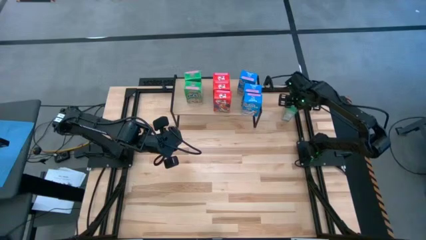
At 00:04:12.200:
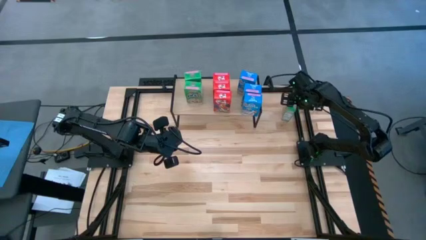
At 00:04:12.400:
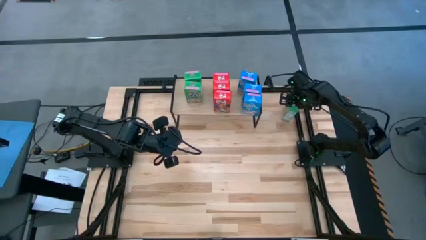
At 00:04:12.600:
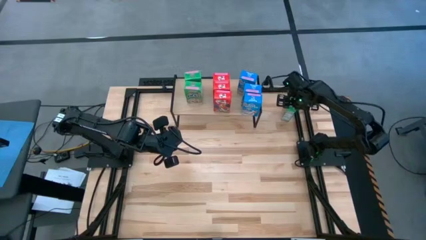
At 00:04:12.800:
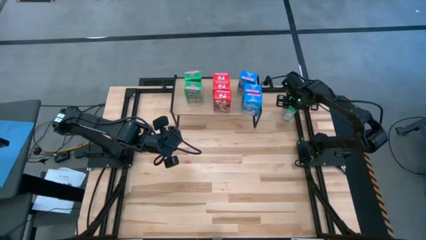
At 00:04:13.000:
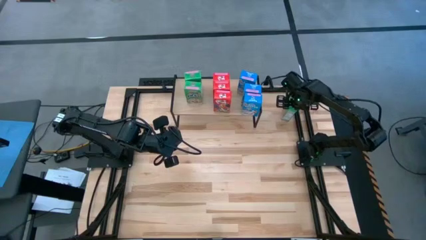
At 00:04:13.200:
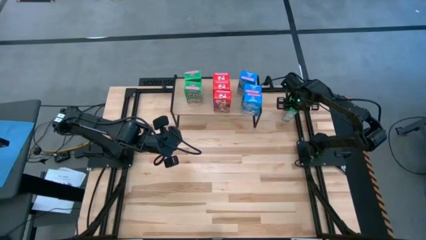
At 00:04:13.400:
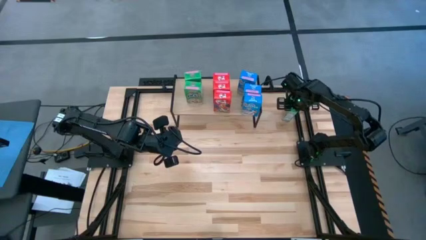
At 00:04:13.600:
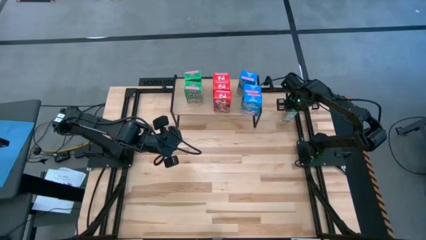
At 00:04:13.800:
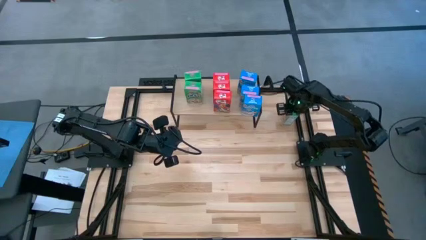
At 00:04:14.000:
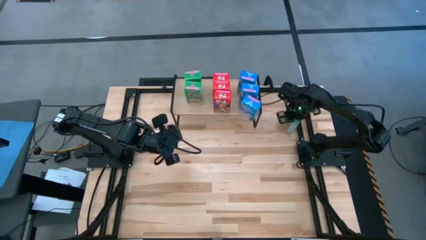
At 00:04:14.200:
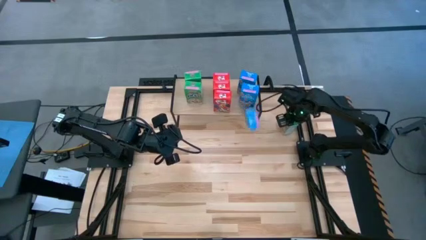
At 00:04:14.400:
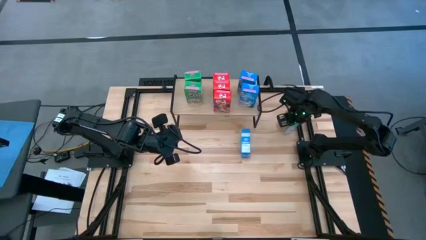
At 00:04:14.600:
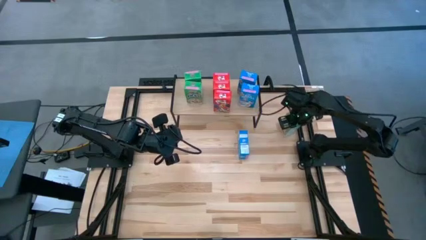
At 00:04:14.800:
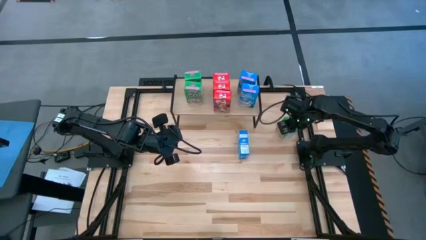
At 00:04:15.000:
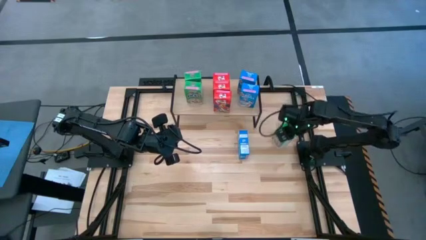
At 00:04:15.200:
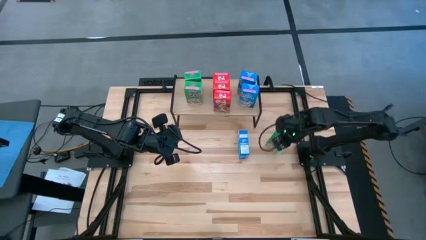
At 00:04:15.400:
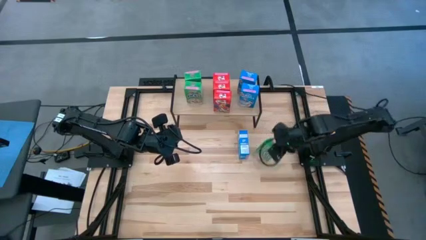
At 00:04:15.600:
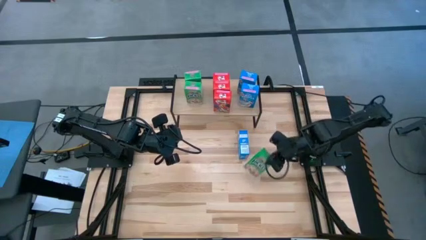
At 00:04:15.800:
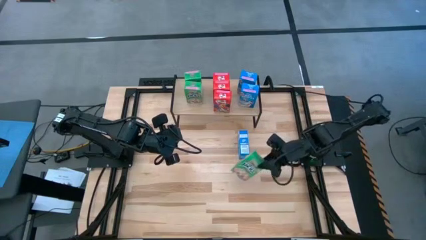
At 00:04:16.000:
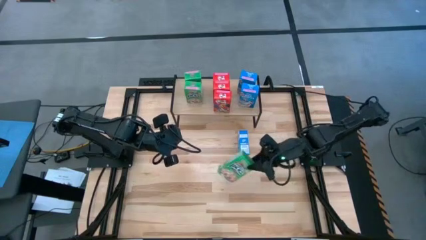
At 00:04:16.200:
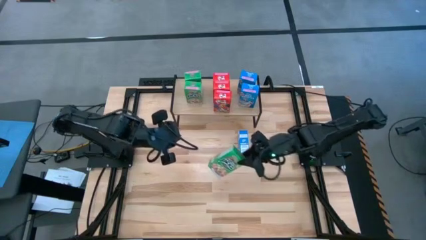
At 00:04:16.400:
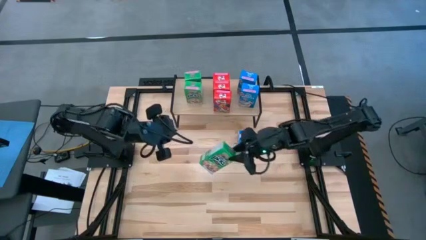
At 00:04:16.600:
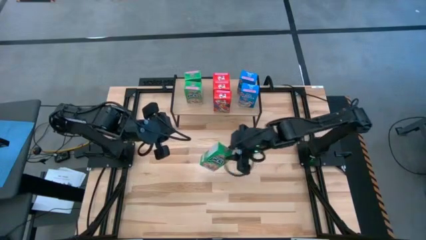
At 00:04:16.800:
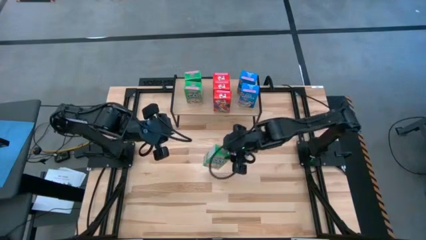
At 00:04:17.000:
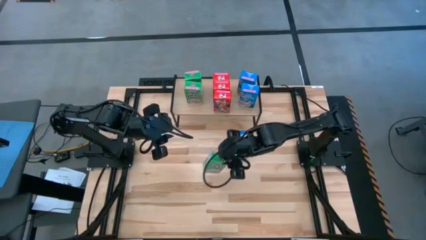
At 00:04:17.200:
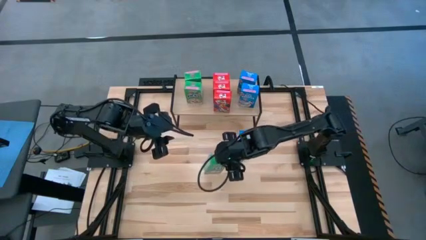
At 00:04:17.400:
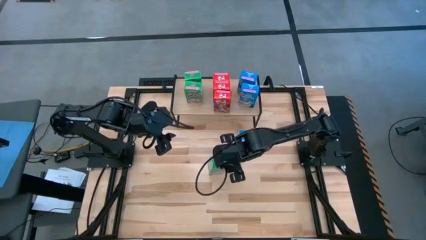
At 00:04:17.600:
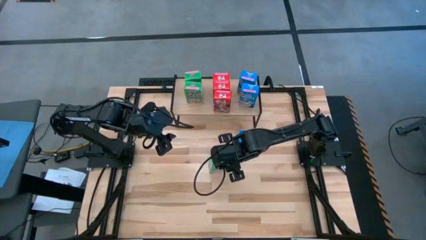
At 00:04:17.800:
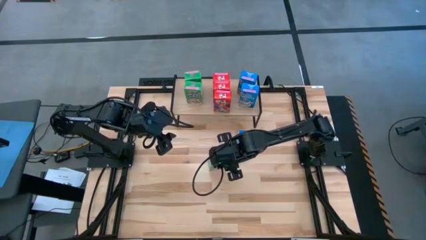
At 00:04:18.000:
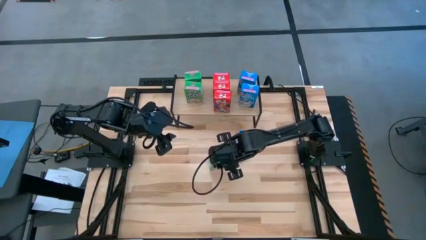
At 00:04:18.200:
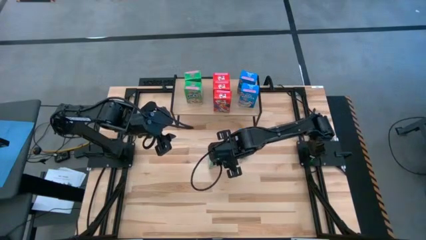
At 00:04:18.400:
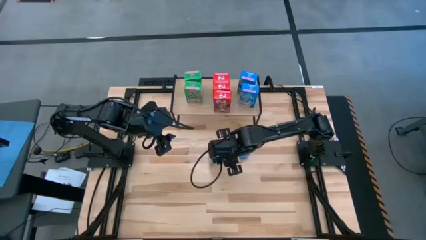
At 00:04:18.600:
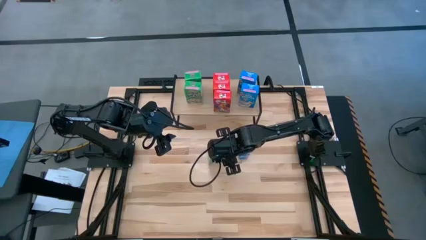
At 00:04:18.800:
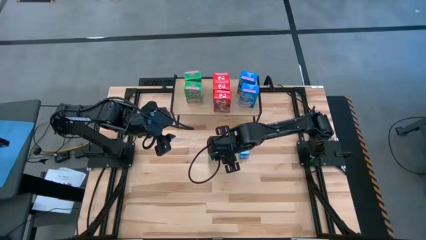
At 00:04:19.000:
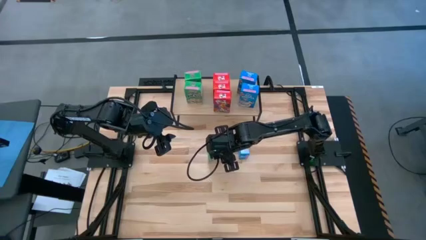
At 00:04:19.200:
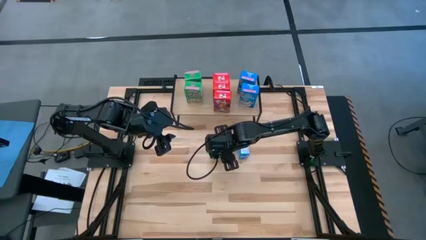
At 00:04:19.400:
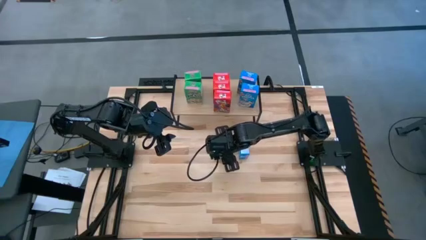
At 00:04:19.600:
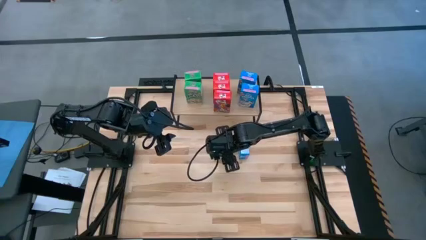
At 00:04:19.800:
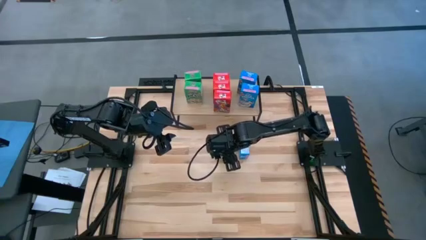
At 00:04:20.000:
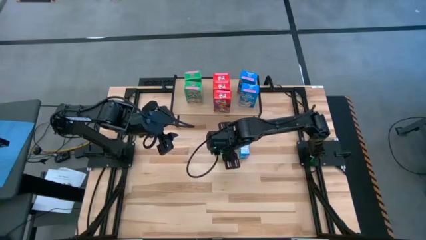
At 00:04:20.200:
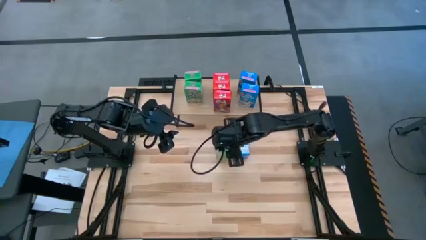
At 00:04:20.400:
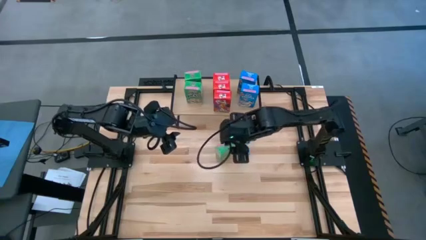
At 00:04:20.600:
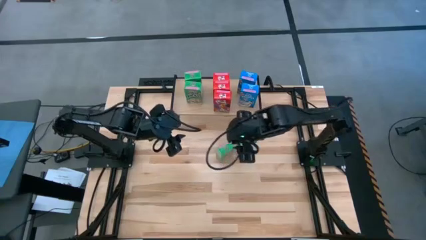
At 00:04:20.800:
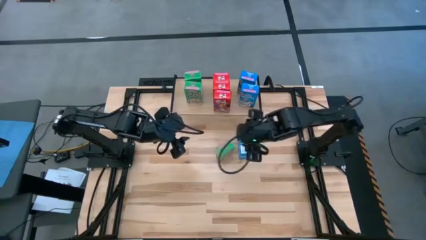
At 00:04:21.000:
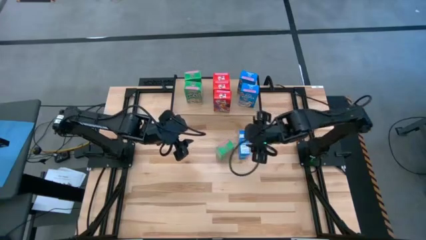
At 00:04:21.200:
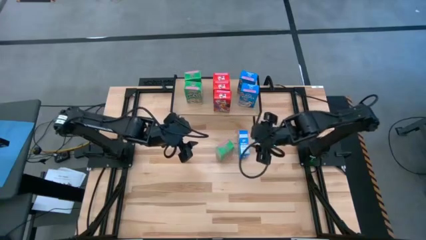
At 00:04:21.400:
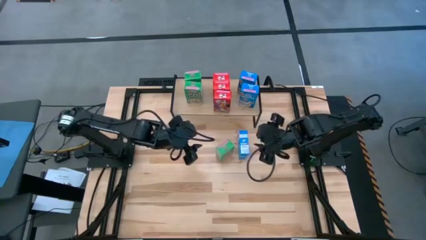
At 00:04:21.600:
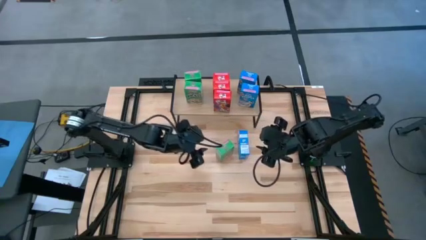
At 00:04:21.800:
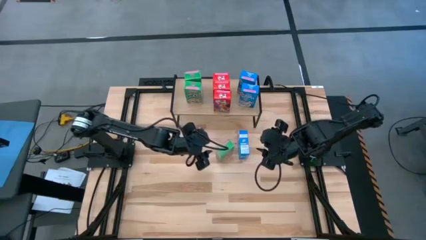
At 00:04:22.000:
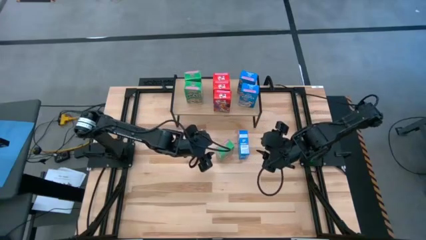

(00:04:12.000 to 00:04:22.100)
Task: Stack cereal on shelf
Put the green cereal box on the shelf aligned with the other green cereal boxes

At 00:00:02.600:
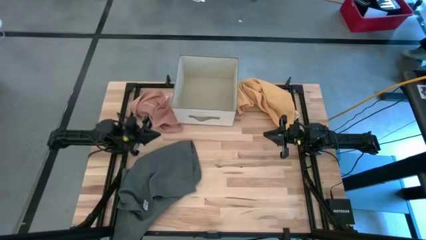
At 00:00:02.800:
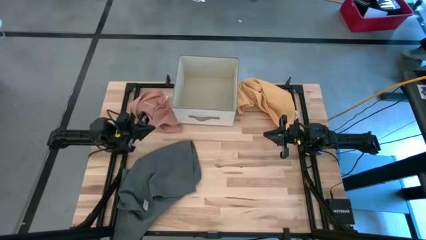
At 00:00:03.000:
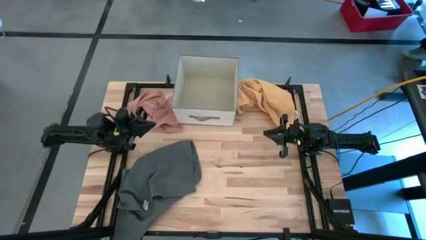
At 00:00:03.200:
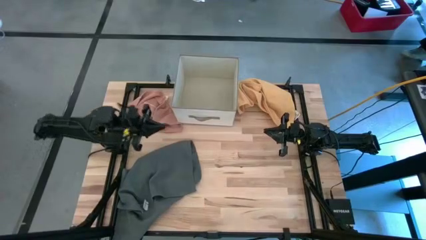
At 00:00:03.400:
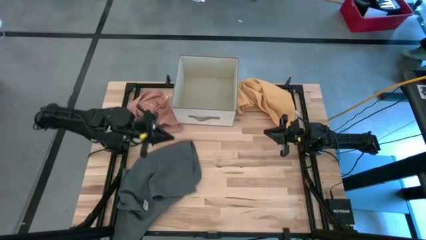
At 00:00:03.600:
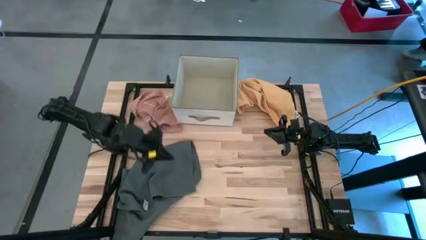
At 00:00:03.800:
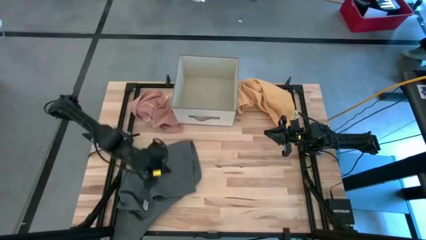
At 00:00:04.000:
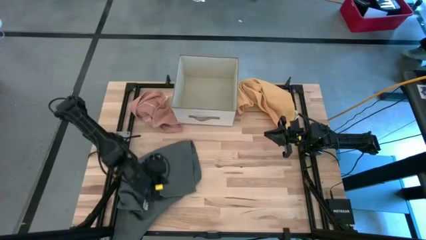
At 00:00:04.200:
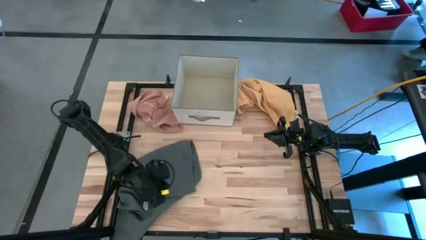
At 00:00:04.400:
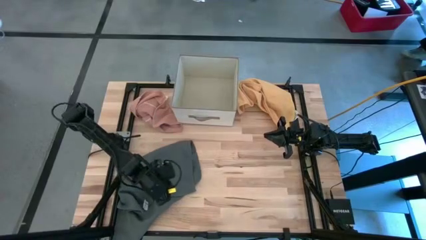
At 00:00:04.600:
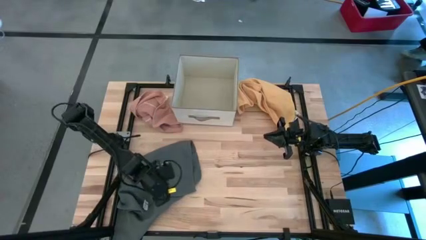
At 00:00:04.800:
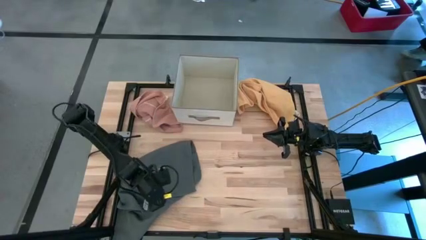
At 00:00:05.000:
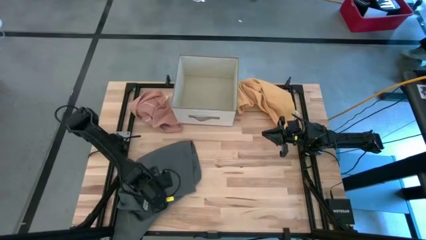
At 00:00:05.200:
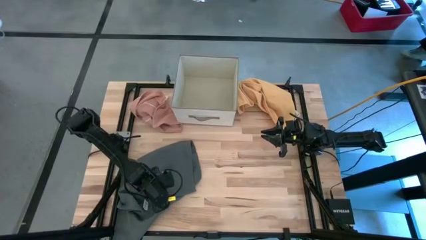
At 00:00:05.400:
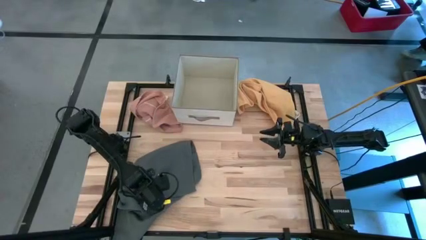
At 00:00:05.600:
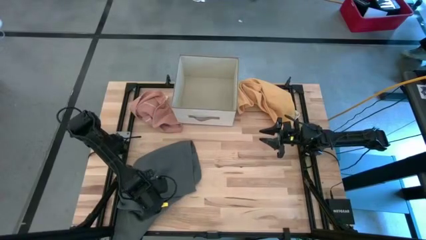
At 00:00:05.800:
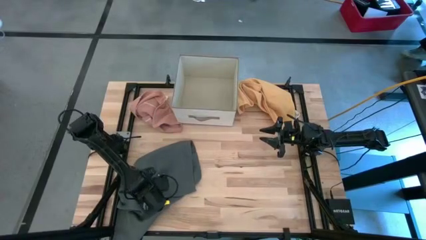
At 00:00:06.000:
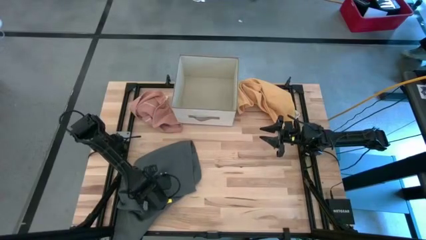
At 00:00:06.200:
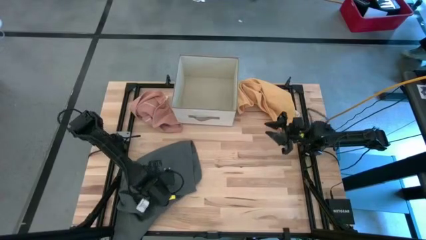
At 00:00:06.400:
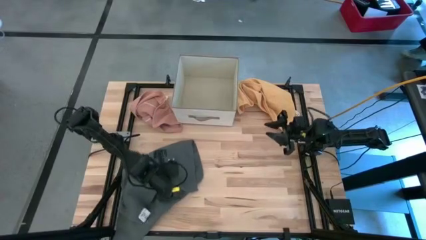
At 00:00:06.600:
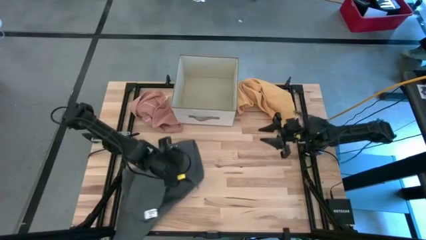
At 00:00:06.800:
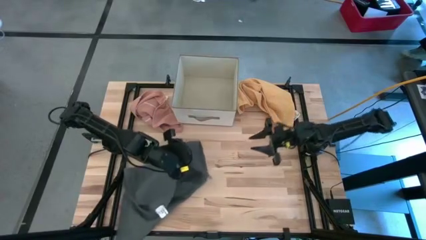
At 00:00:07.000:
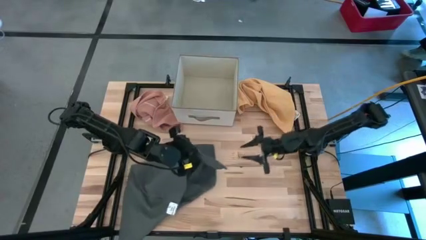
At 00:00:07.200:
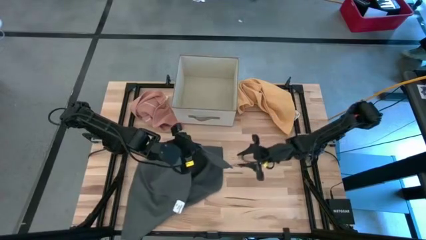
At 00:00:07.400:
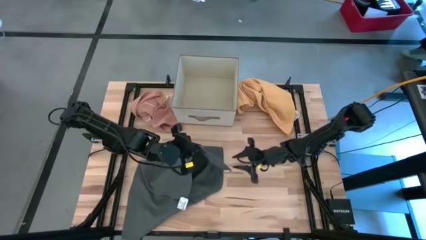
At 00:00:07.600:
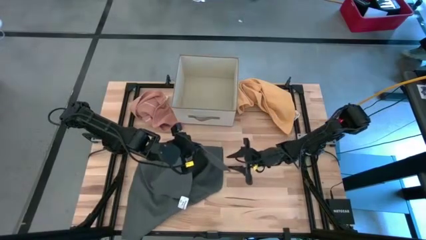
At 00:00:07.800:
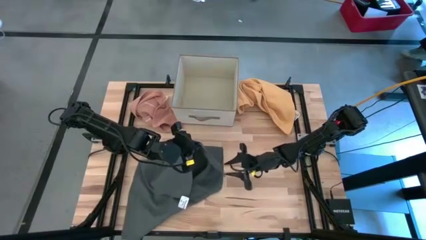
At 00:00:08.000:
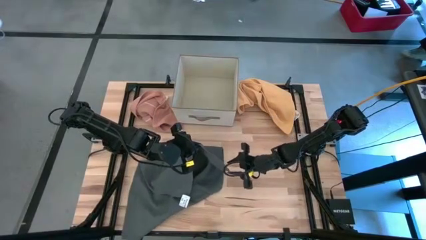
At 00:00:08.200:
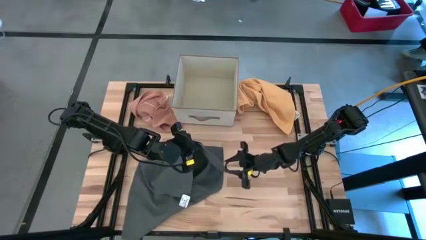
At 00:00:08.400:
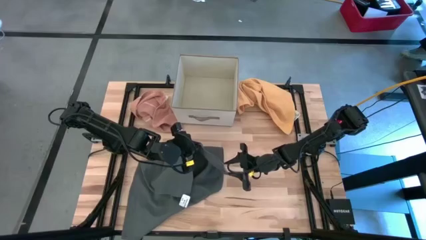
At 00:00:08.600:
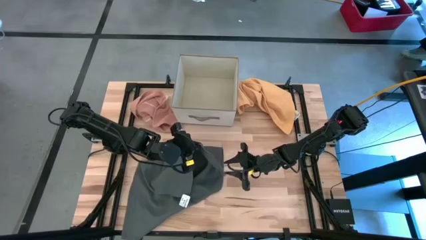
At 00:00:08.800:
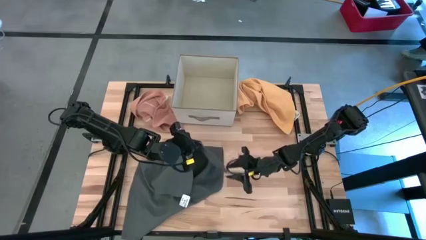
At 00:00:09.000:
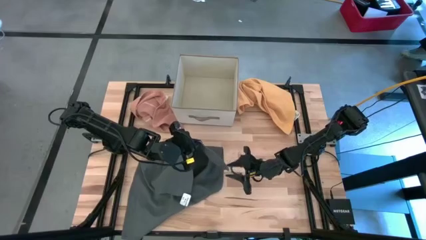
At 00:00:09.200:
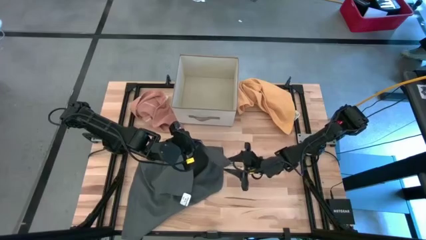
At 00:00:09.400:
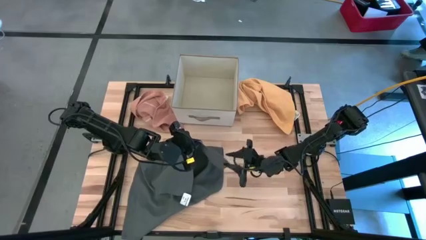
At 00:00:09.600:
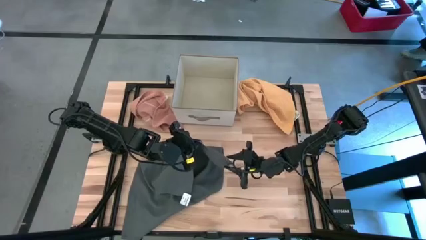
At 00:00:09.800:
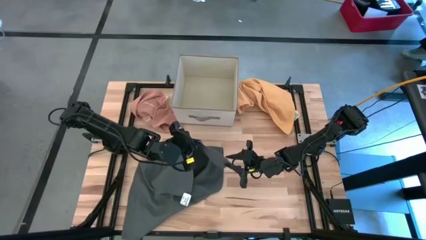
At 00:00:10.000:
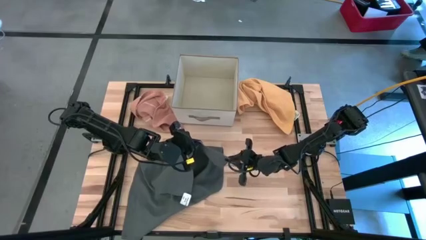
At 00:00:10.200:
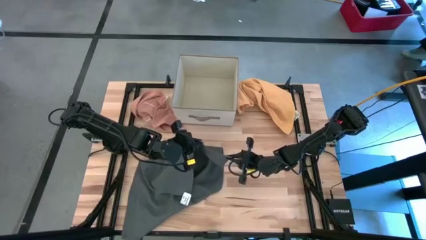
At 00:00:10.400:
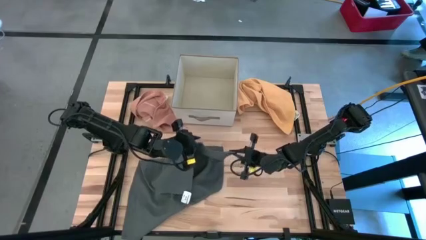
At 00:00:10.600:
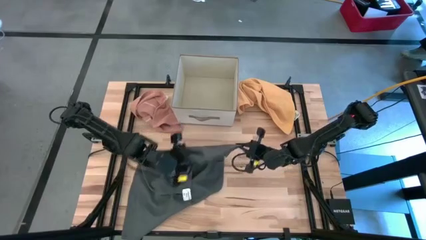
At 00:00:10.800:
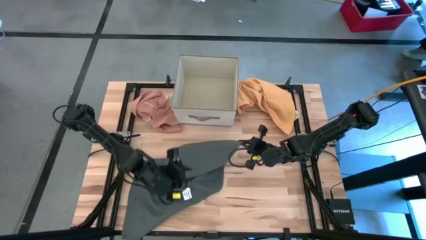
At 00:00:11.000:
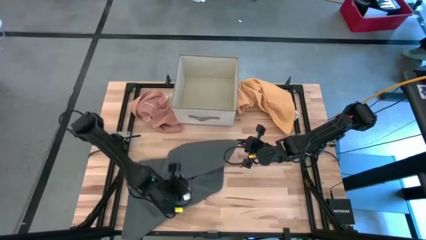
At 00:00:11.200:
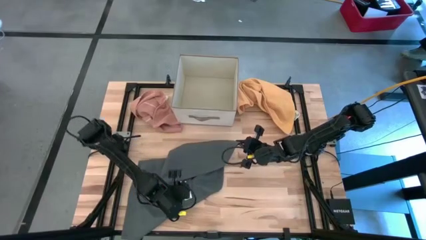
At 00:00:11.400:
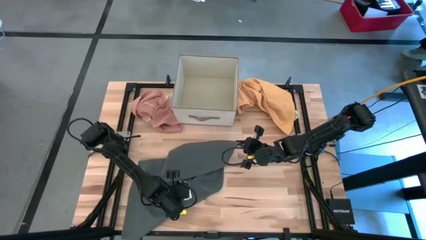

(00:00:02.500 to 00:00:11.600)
Task: Fold towel
Fold the dark gray towel
